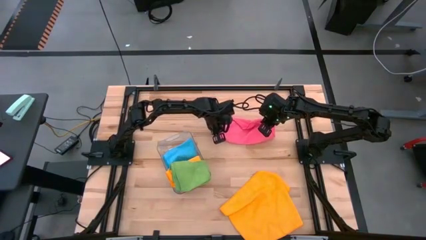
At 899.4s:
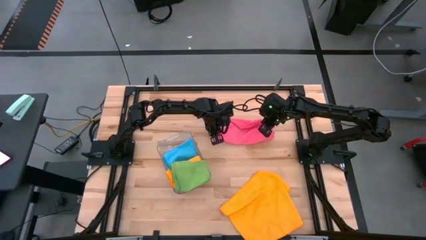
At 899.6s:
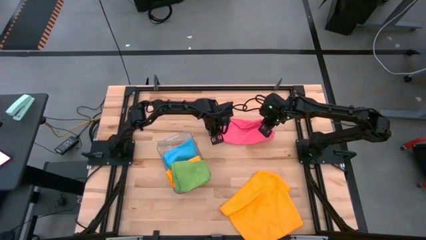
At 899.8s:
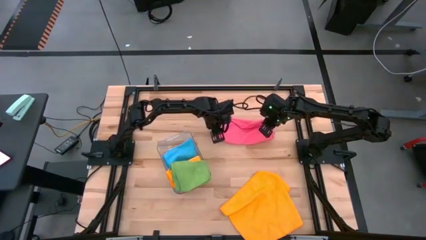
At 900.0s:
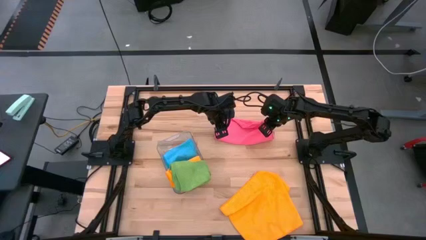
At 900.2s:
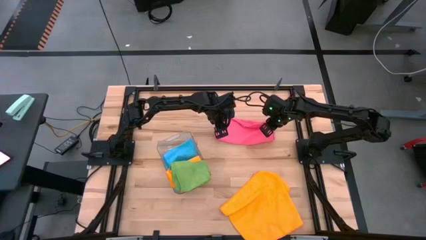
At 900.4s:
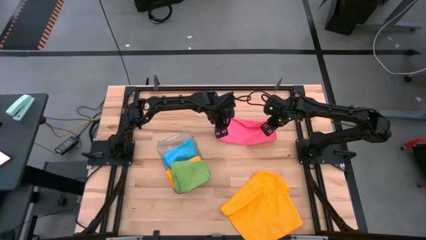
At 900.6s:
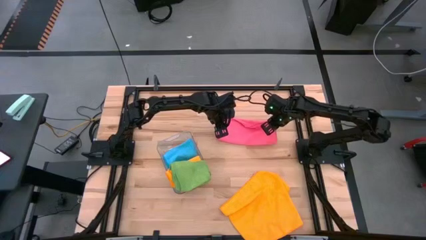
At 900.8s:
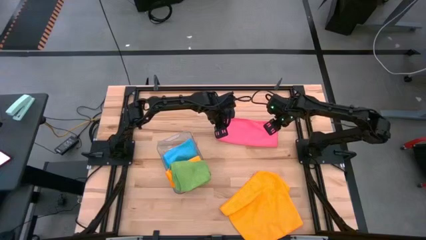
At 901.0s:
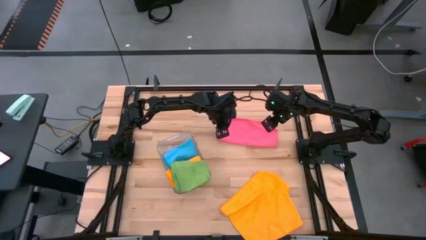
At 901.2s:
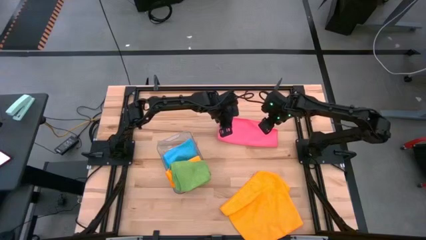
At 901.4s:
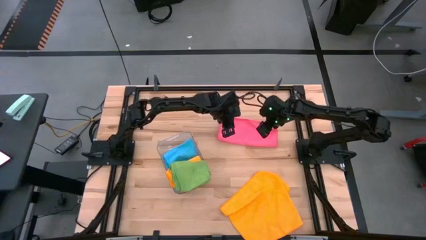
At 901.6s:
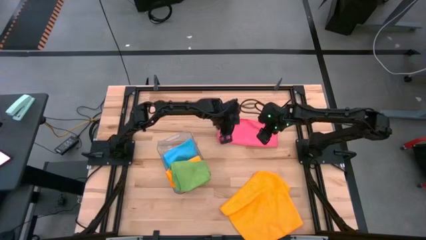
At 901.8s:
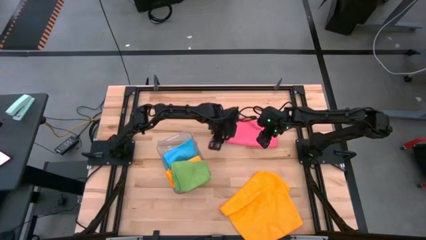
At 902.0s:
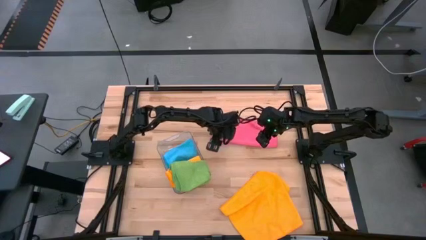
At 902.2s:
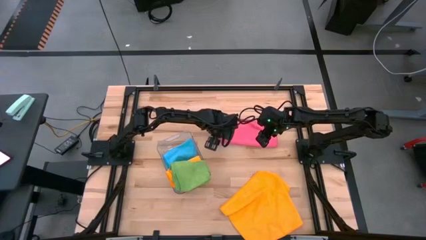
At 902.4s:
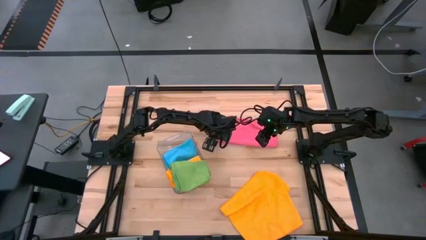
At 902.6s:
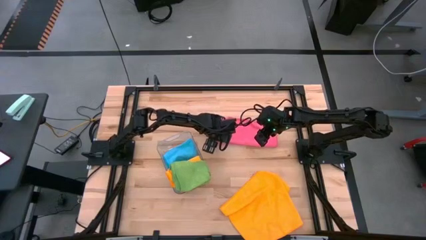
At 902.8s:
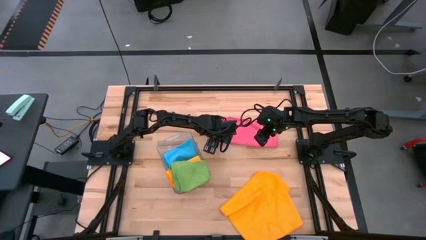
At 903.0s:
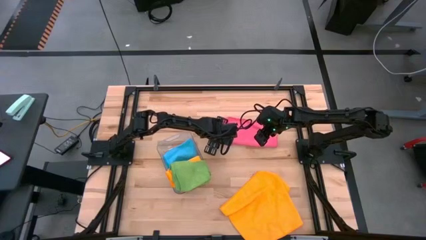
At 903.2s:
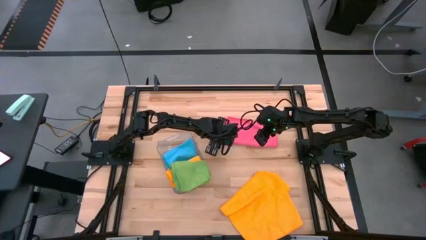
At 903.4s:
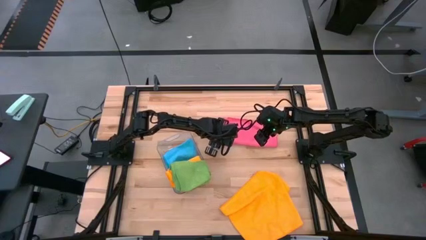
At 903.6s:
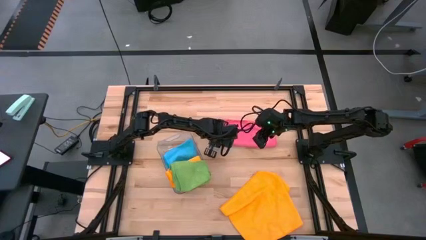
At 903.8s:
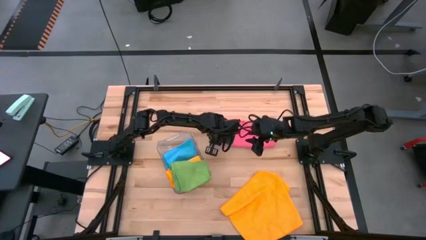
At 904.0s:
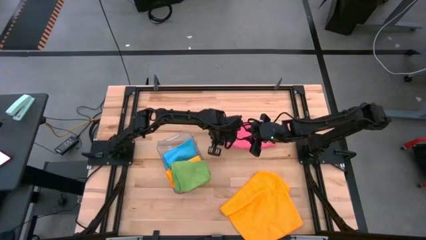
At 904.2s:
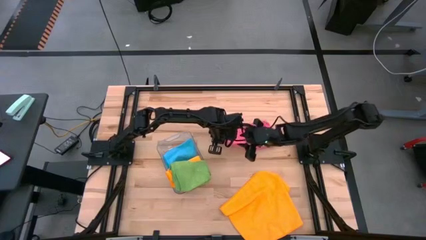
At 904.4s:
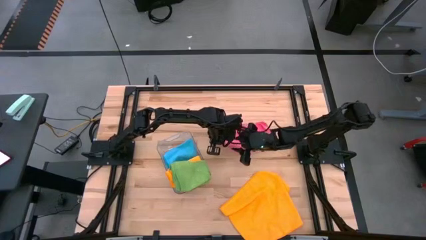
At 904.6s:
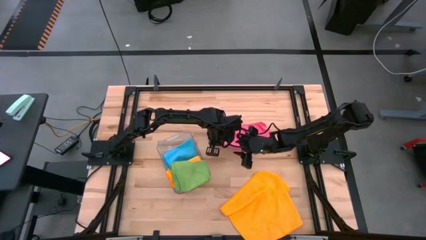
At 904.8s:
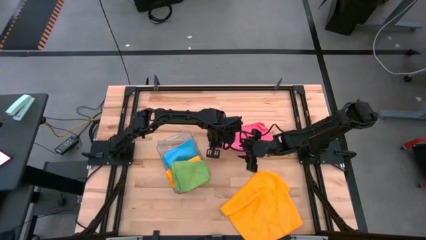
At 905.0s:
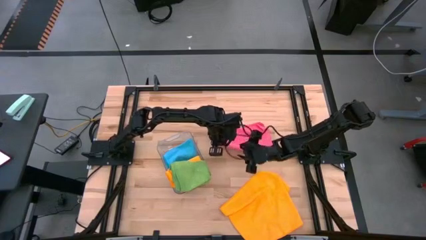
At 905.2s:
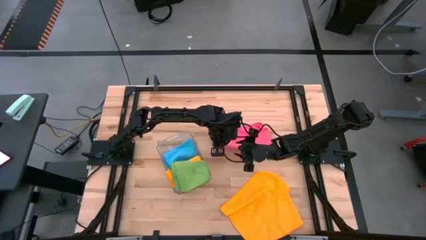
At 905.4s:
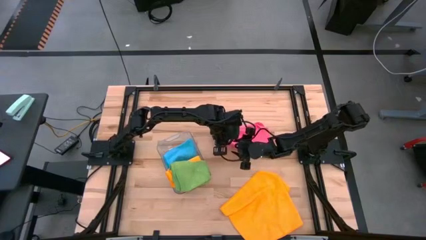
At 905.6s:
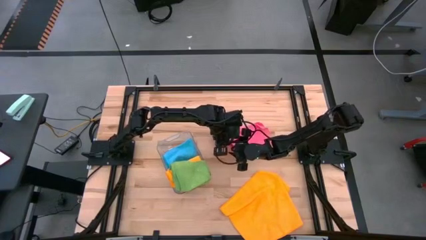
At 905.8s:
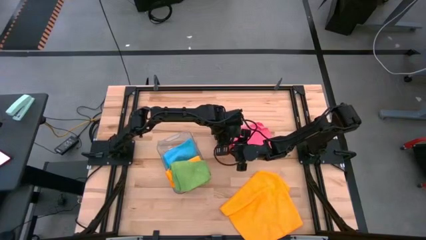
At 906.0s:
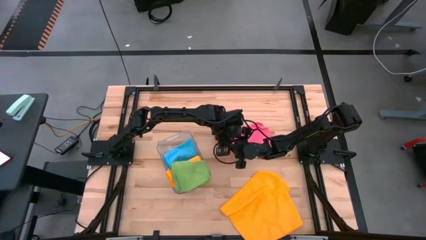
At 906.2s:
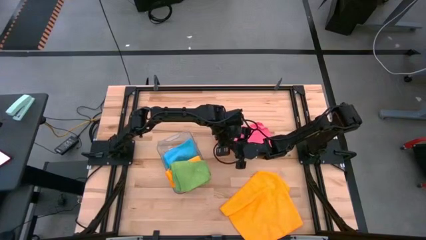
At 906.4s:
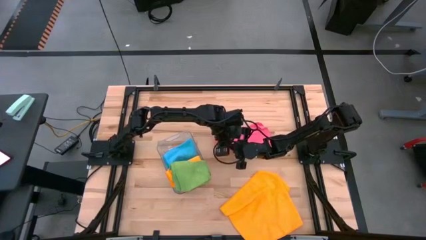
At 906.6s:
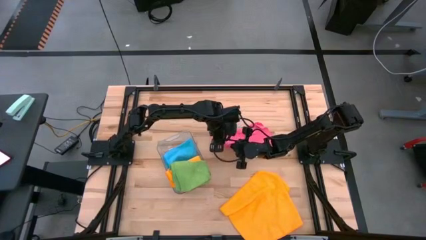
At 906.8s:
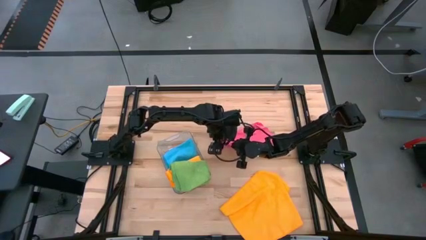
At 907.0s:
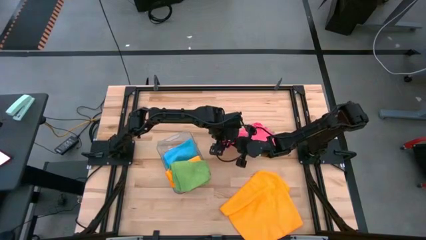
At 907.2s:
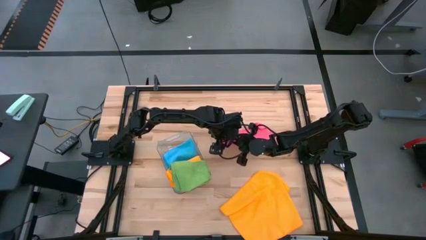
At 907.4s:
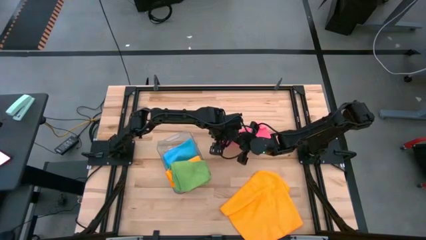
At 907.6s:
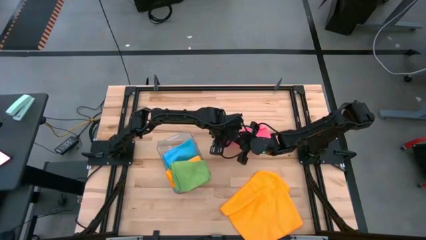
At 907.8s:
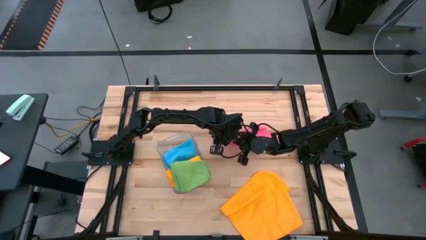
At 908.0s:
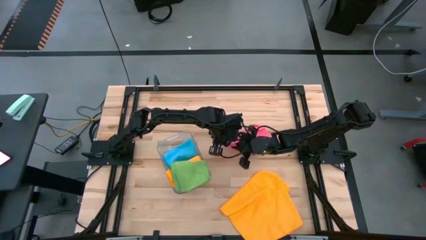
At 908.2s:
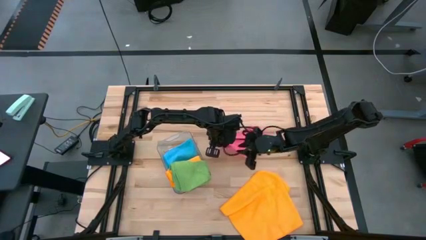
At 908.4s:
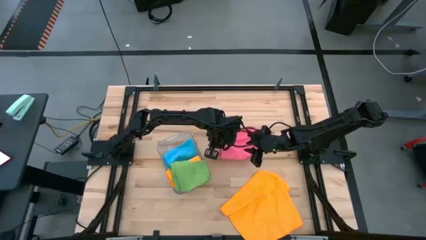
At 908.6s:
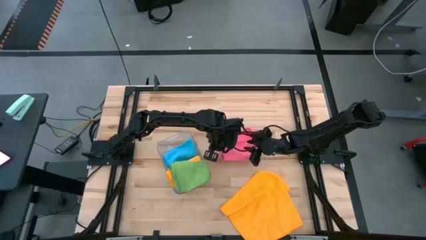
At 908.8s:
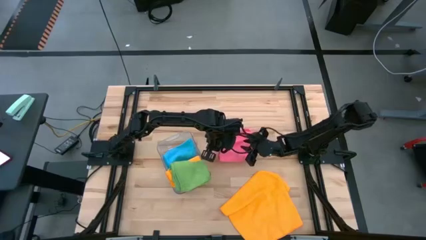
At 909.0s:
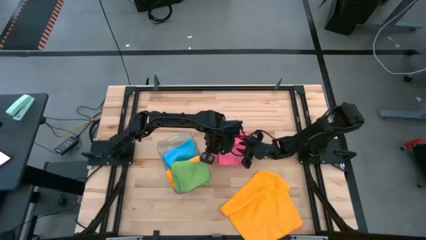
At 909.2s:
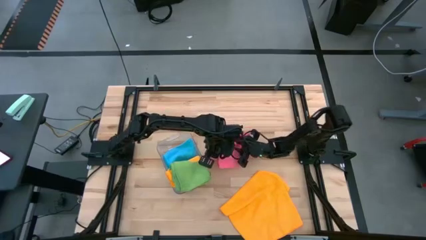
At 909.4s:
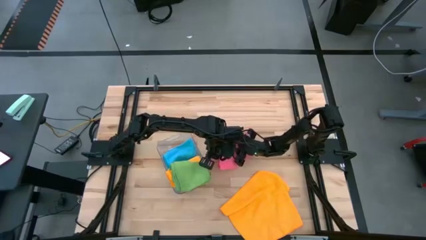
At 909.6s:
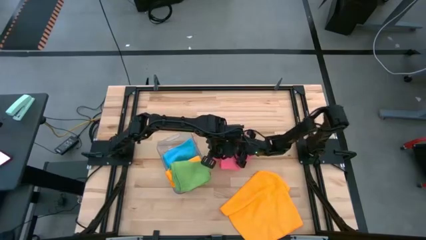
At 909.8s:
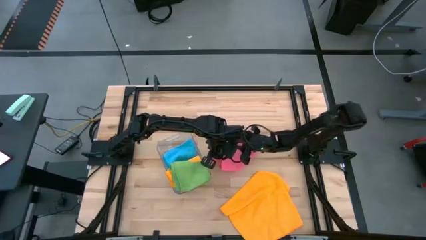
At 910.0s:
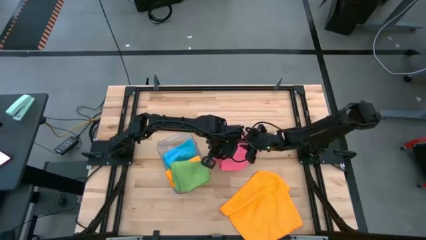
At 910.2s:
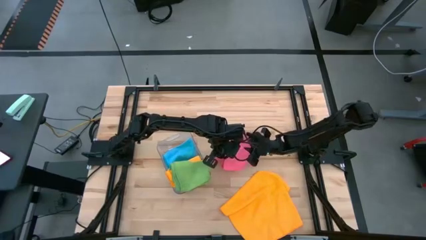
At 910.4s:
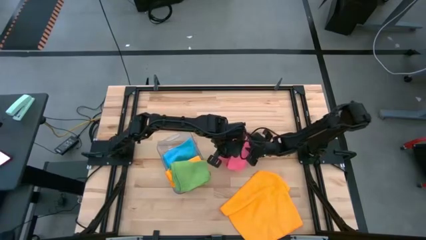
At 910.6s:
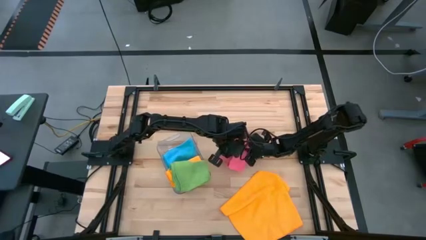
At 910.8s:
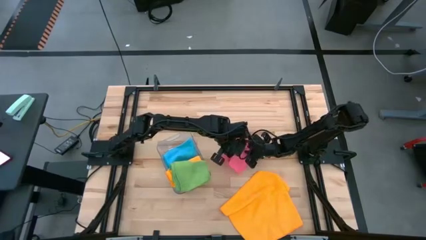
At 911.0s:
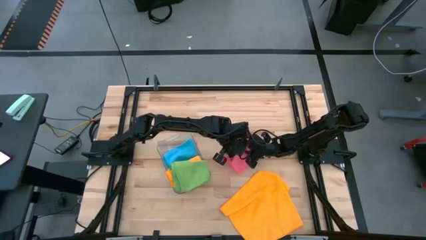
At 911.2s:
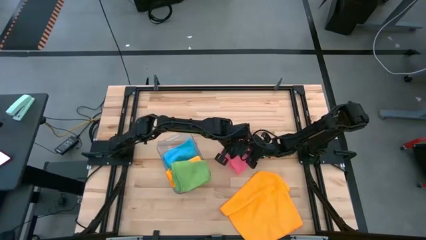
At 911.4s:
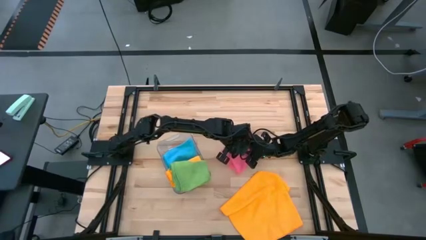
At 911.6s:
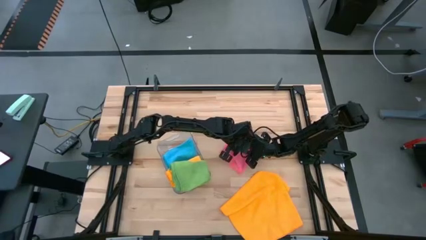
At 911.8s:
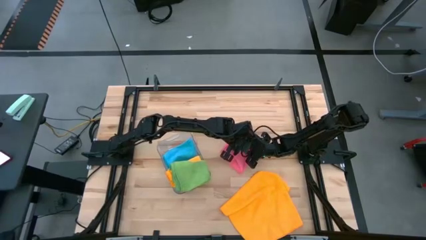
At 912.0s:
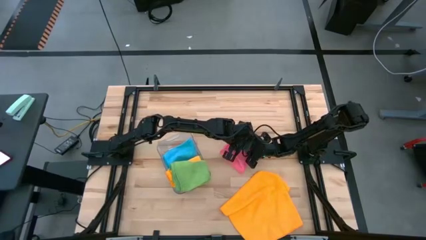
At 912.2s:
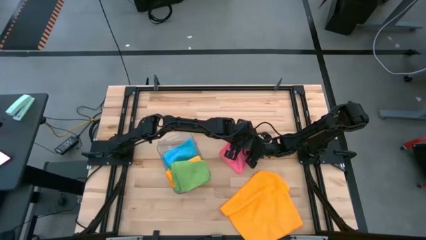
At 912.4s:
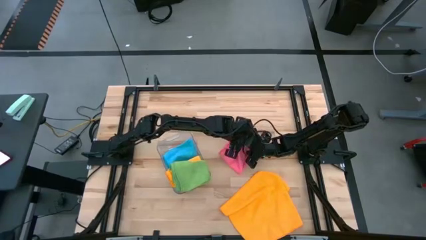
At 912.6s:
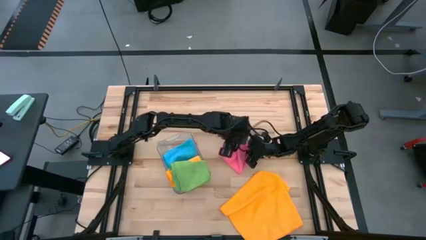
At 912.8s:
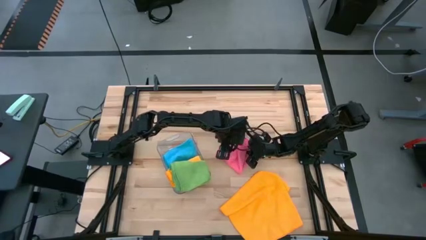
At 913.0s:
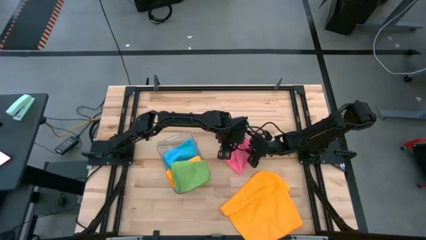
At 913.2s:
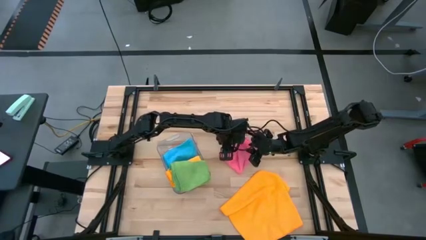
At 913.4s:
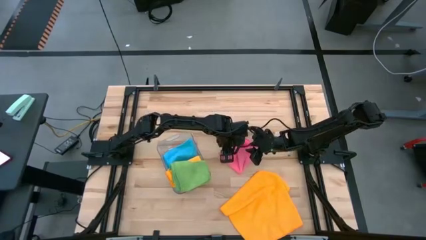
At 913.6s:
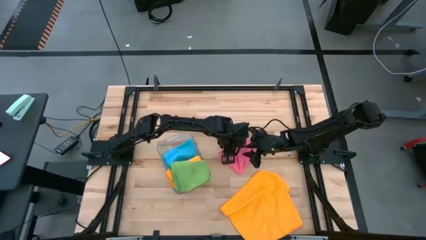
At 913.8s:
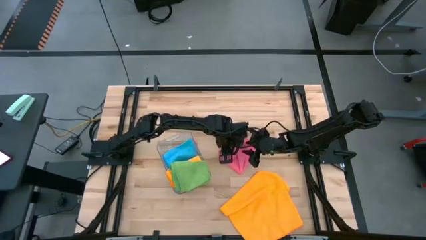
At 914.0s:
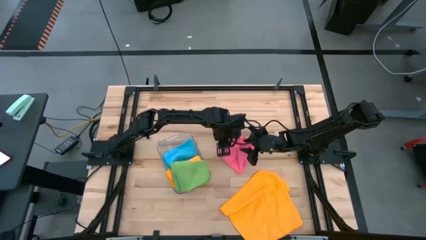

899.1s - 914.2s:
Task: Fold microfiber towels
Fold the pink towel
